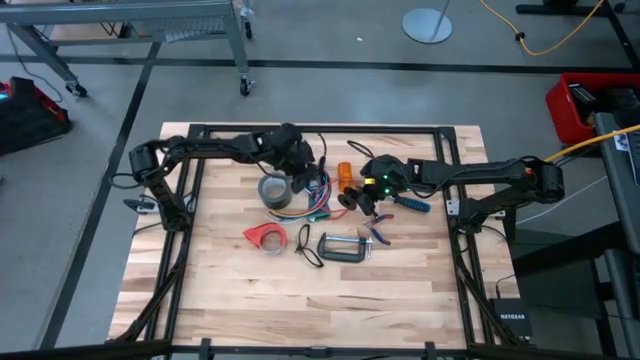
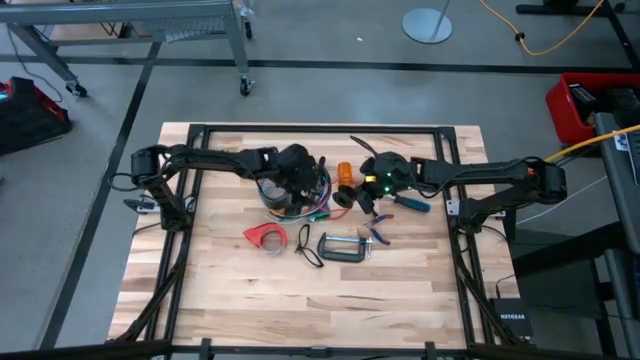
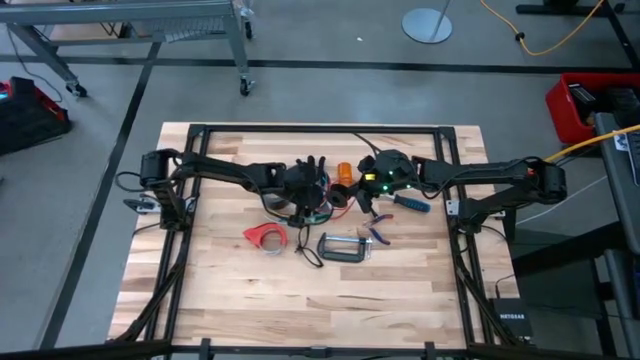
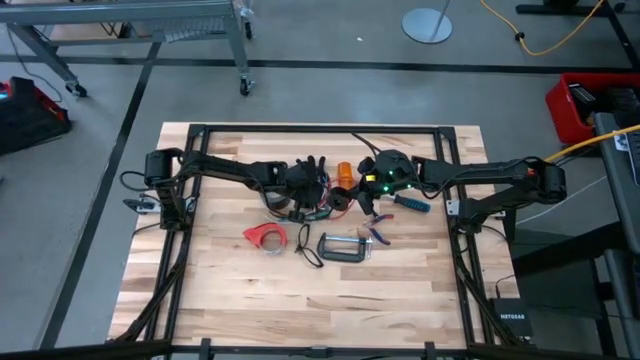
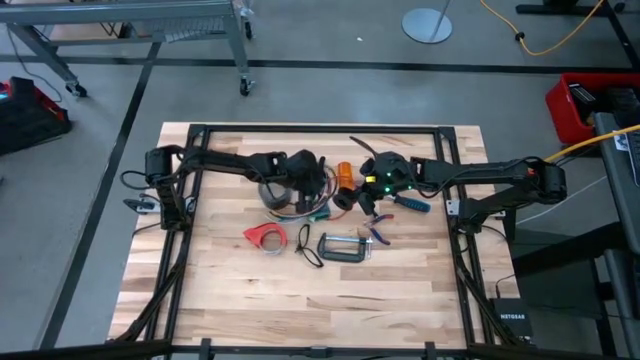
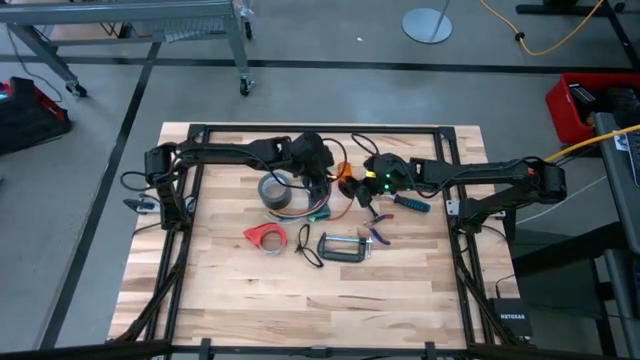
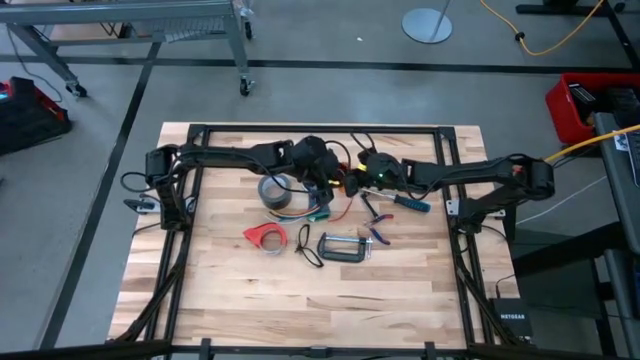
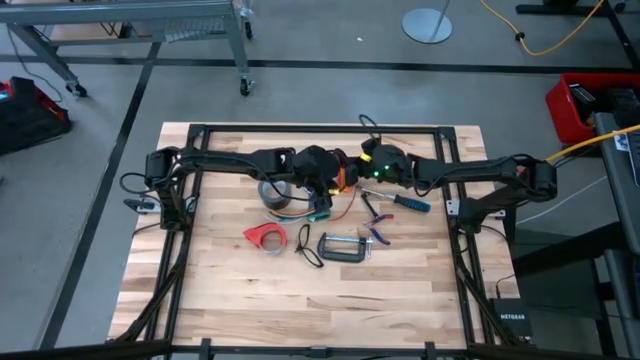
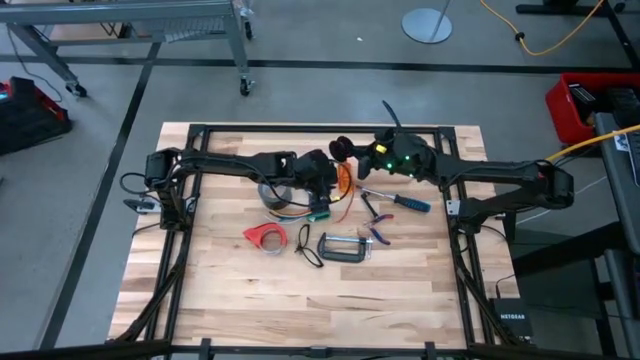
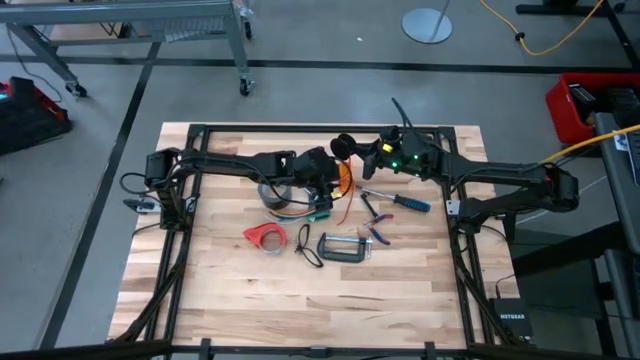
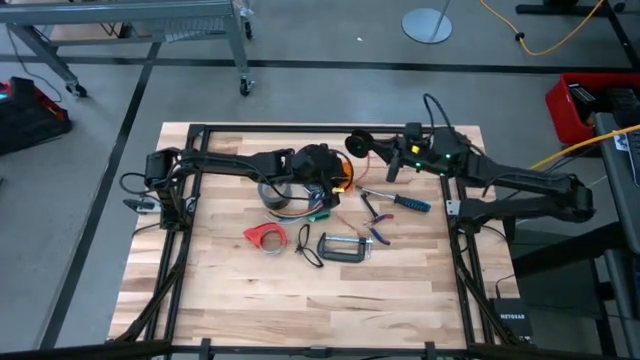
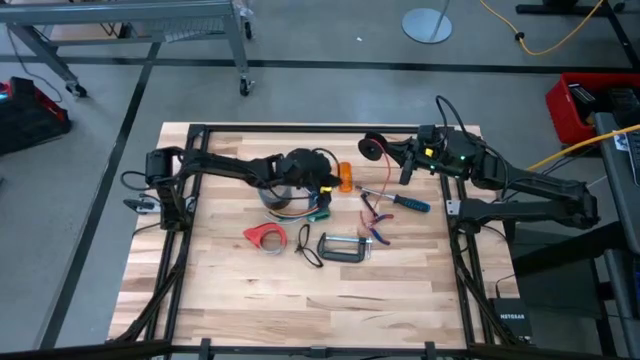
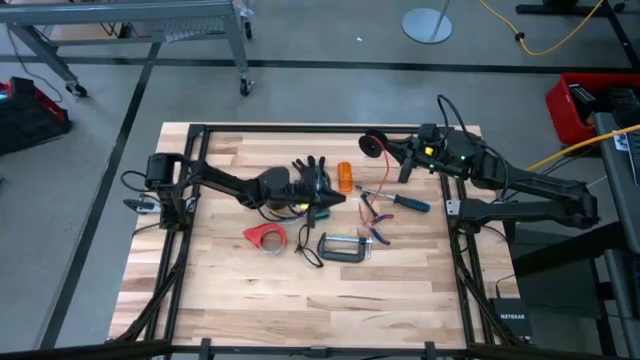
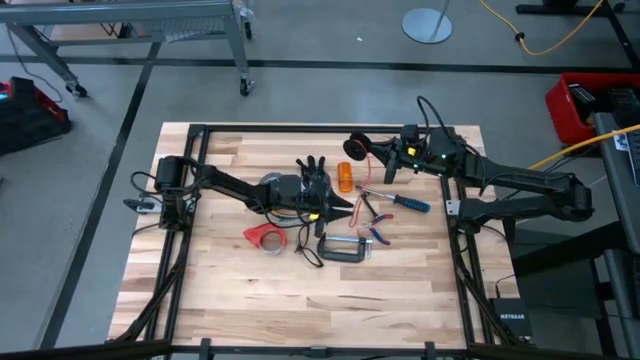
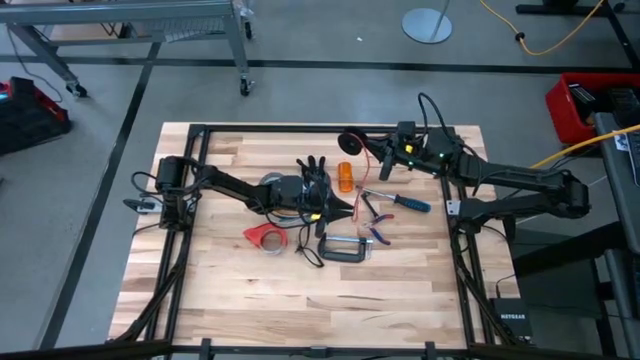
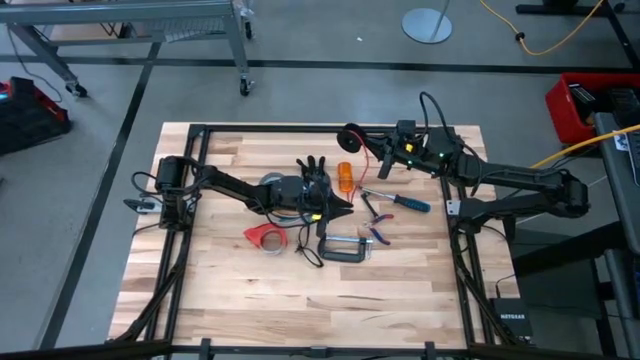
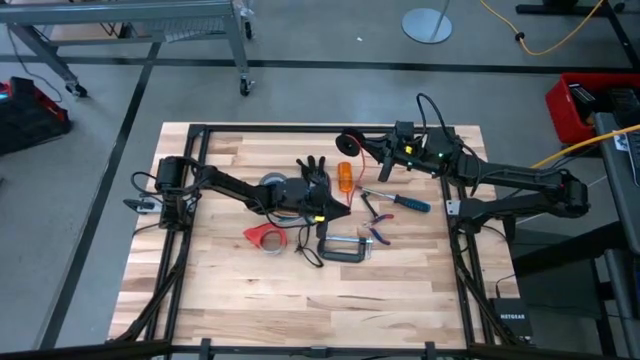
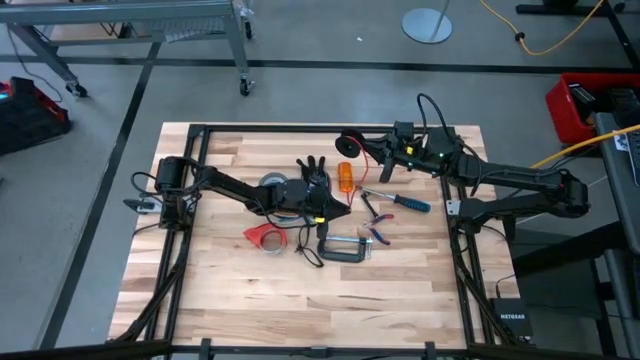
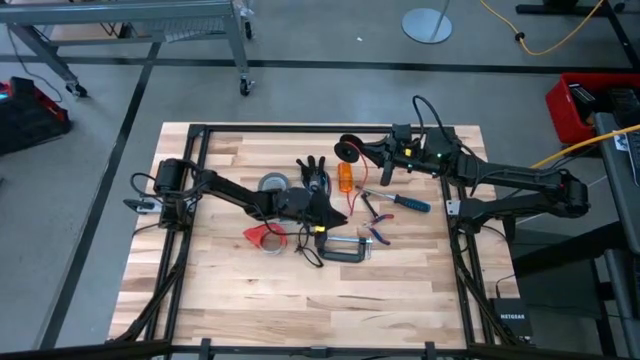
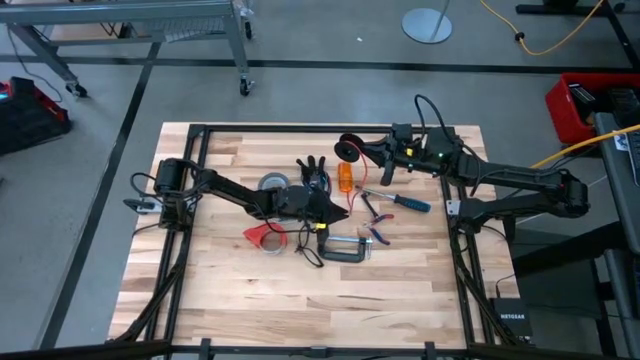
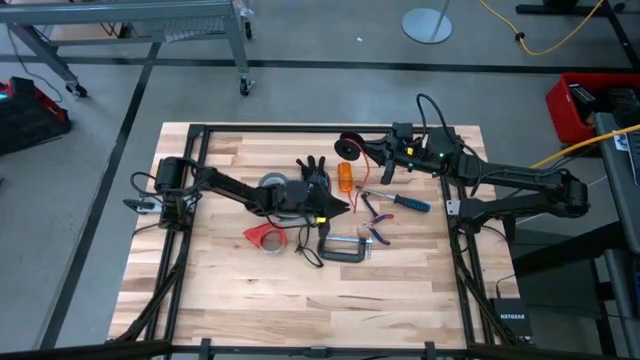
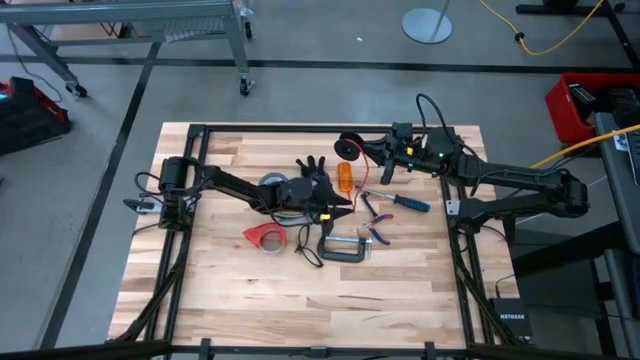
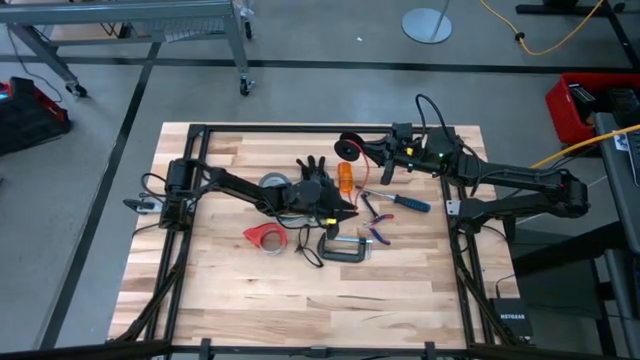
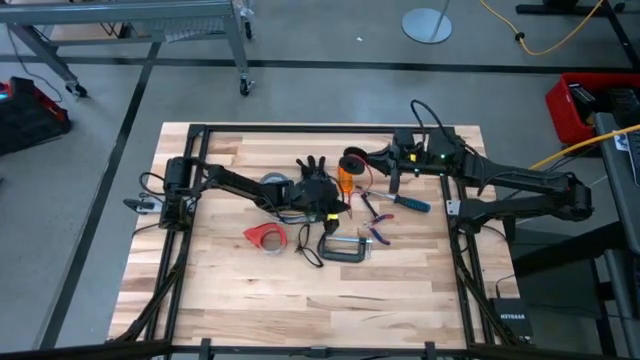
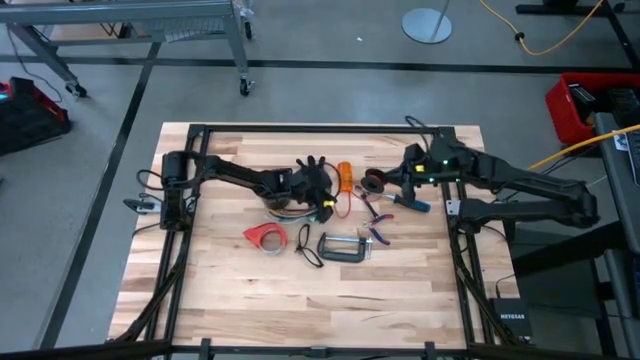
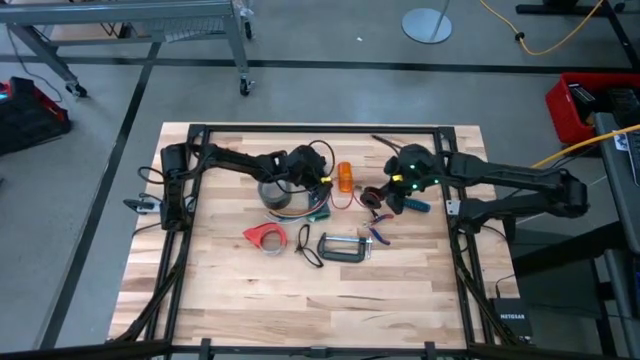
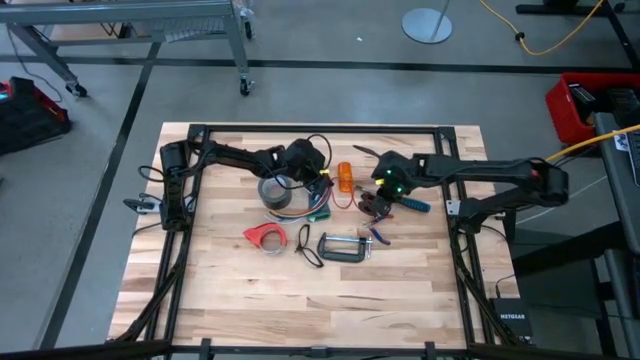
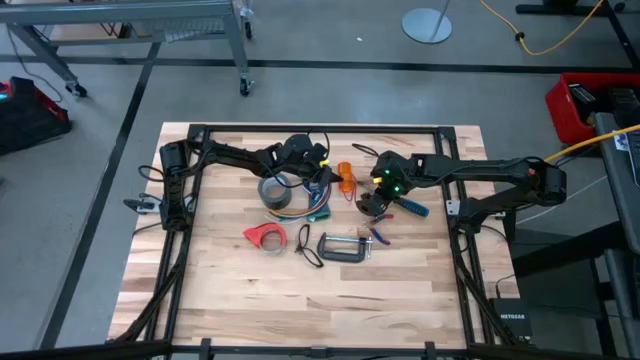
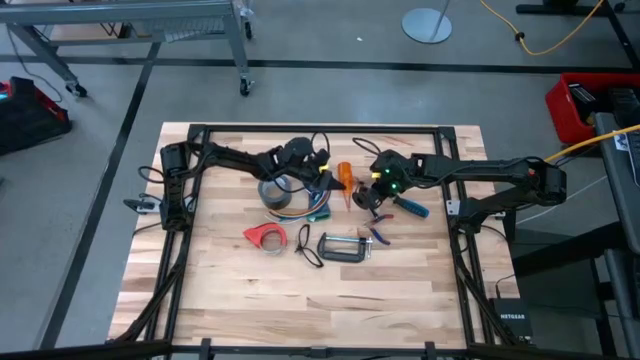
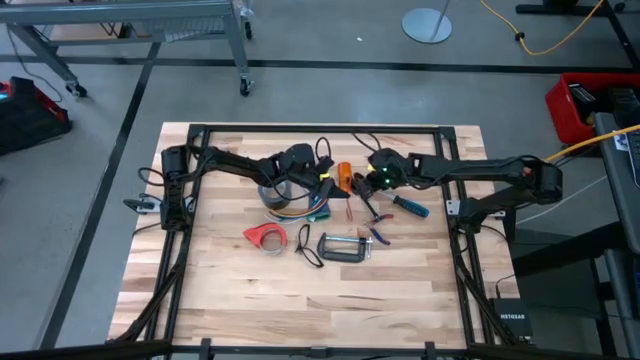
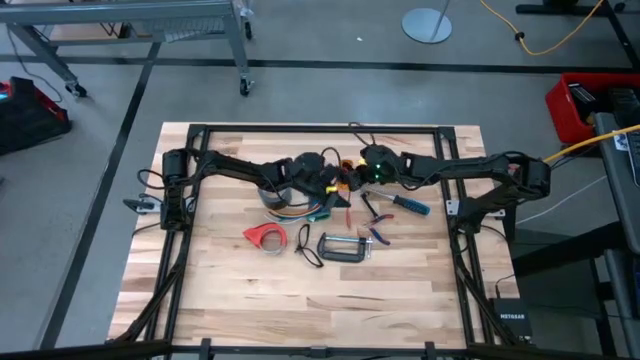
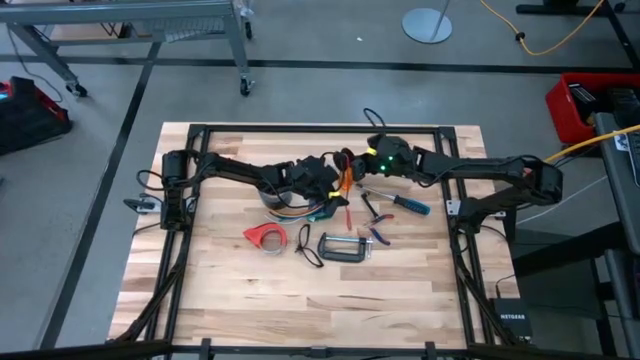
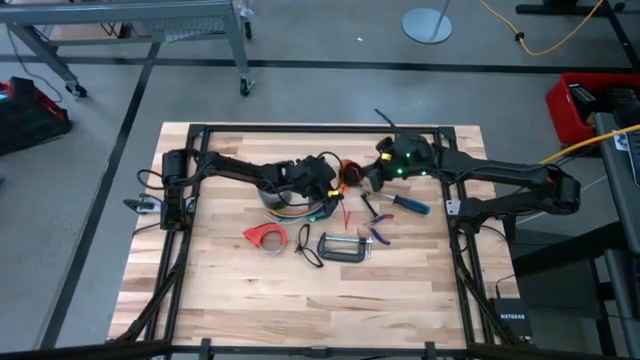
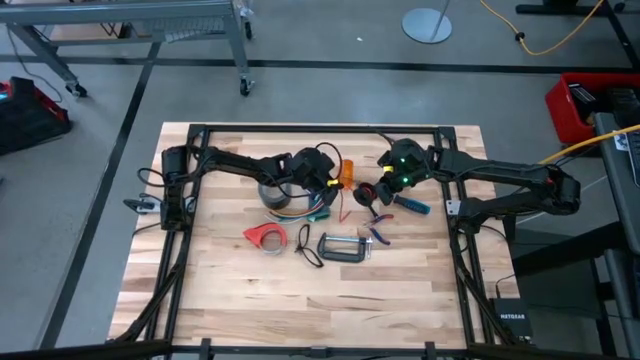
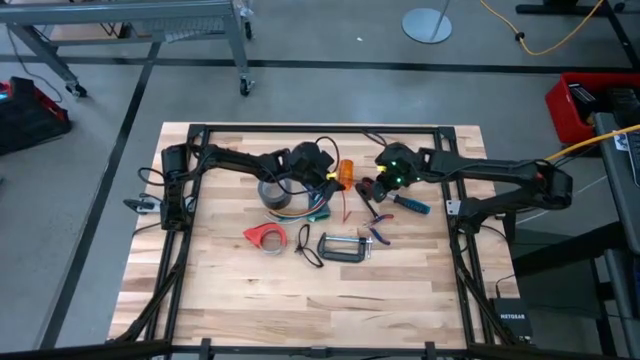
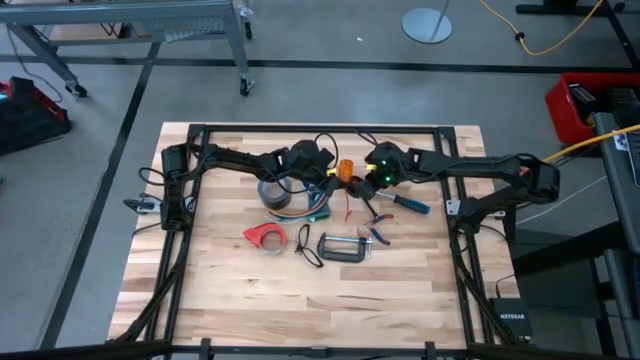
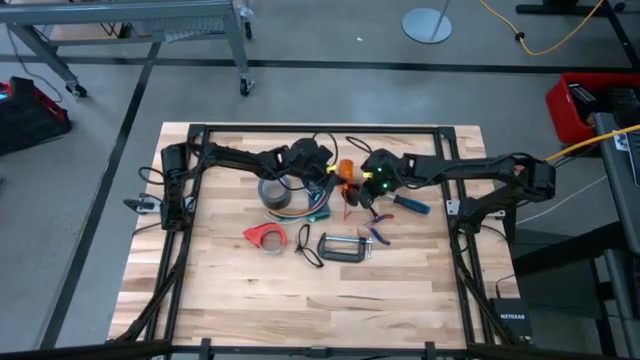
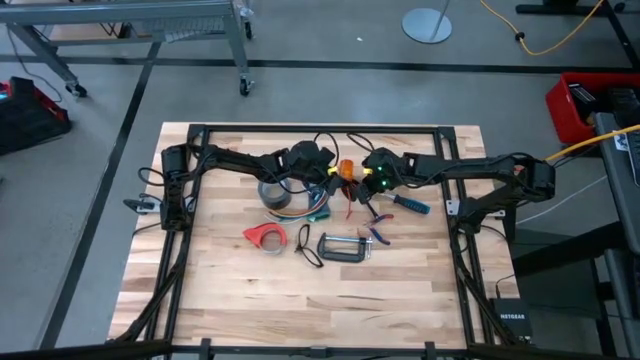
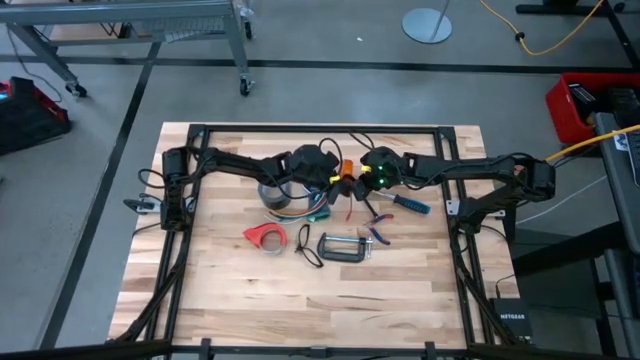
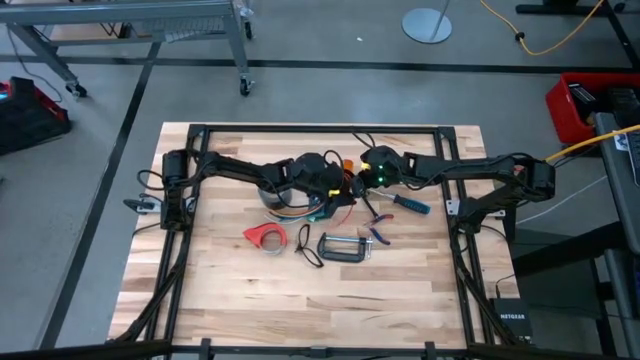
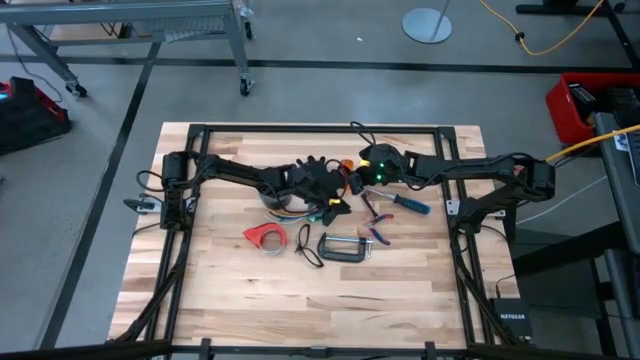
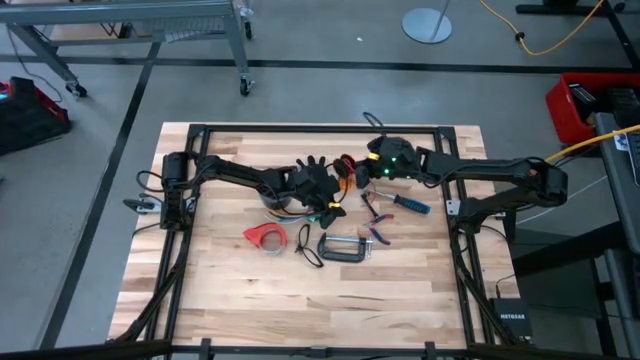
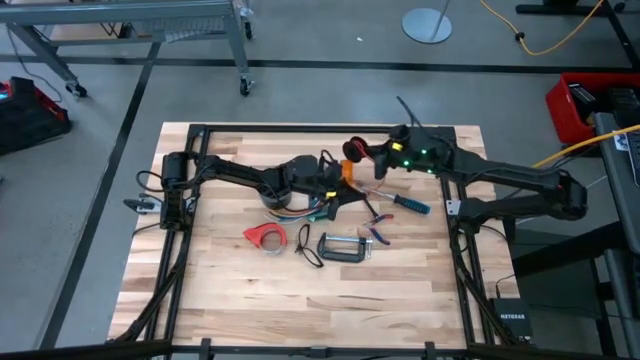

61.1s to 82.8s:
Task: Coil cords
Coil the red wire
